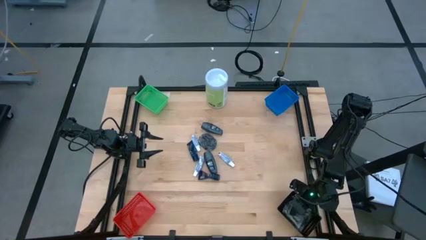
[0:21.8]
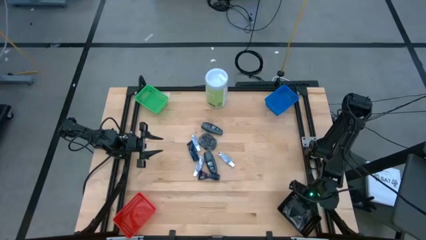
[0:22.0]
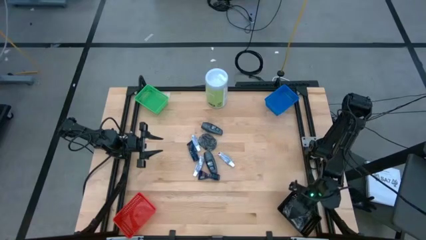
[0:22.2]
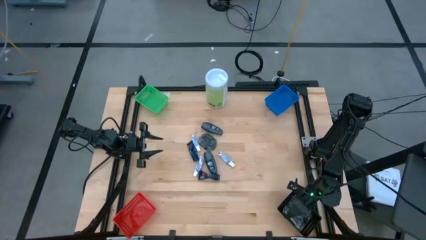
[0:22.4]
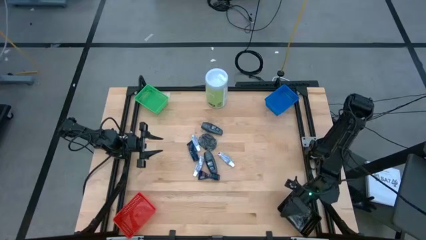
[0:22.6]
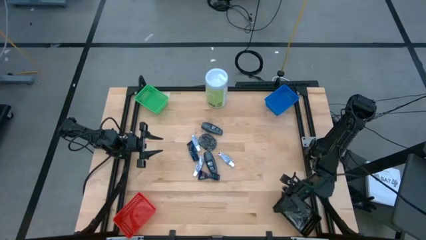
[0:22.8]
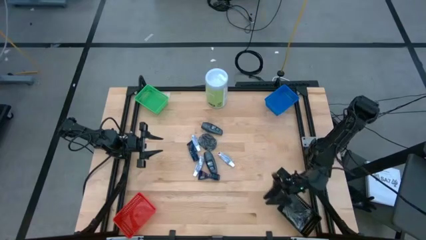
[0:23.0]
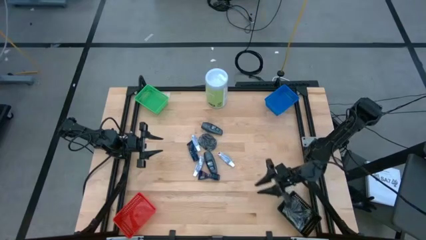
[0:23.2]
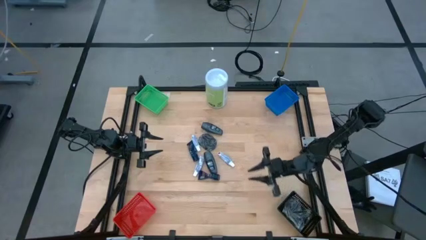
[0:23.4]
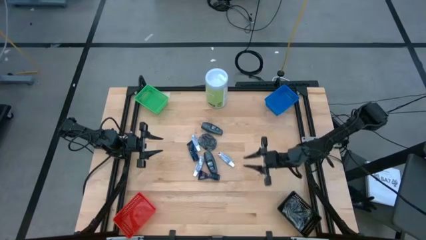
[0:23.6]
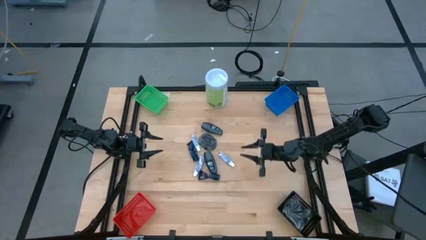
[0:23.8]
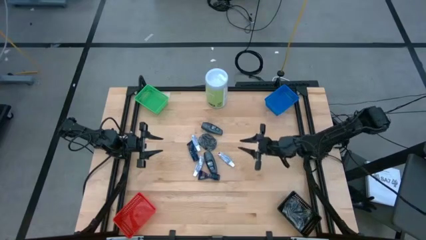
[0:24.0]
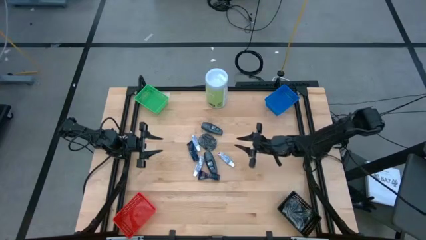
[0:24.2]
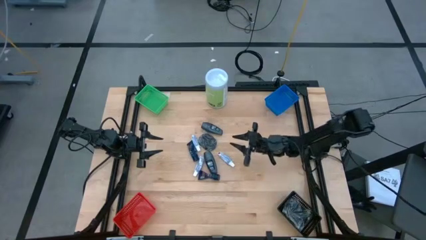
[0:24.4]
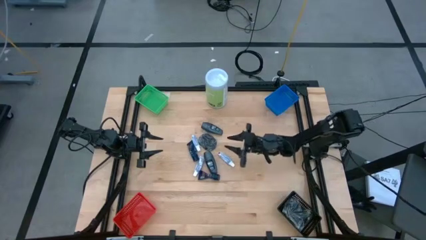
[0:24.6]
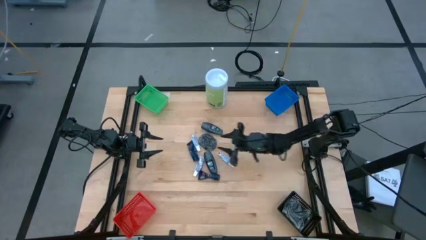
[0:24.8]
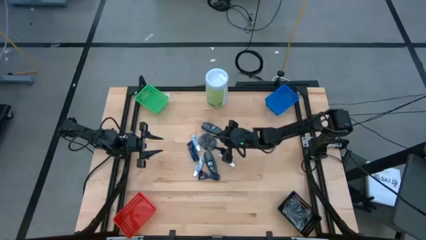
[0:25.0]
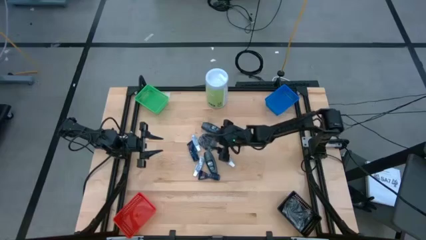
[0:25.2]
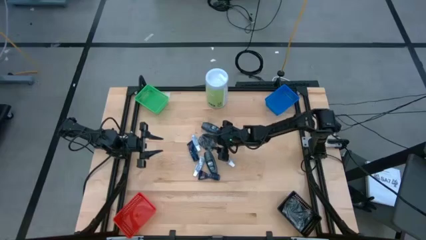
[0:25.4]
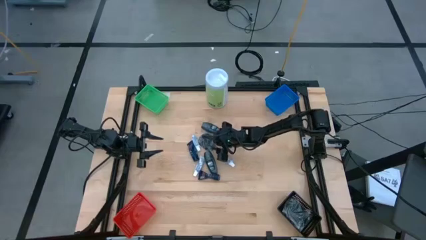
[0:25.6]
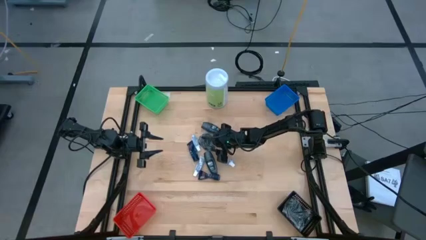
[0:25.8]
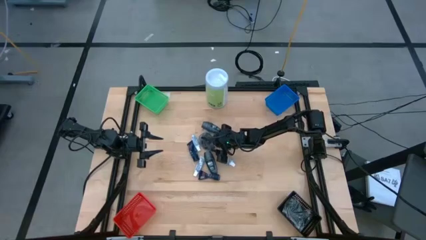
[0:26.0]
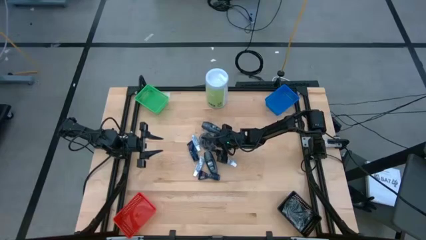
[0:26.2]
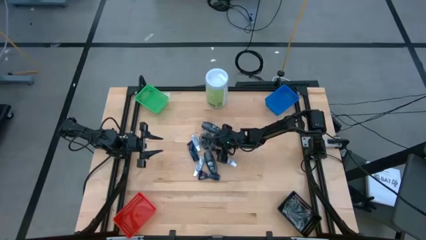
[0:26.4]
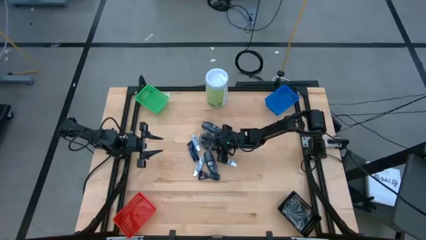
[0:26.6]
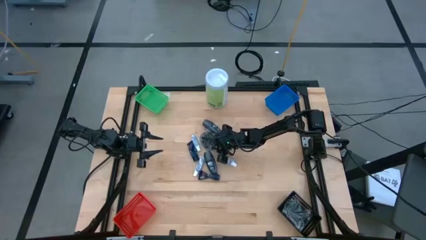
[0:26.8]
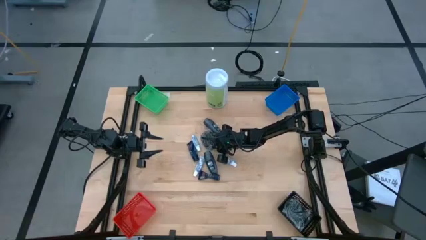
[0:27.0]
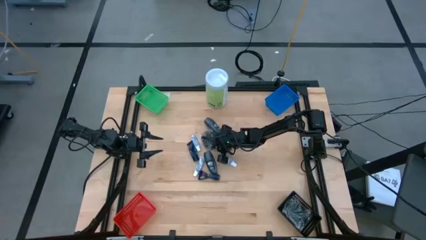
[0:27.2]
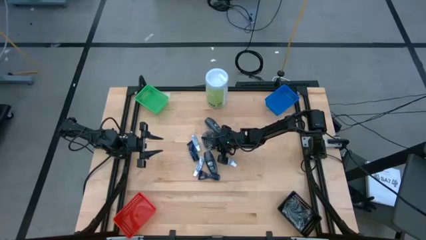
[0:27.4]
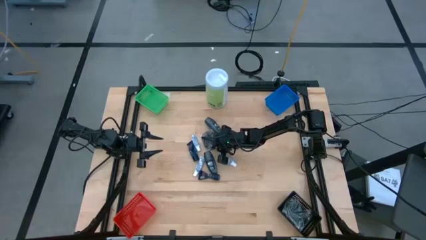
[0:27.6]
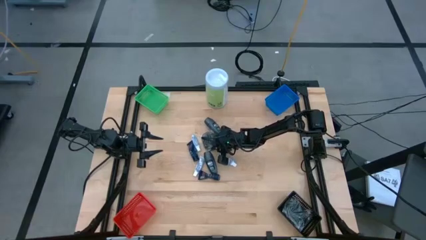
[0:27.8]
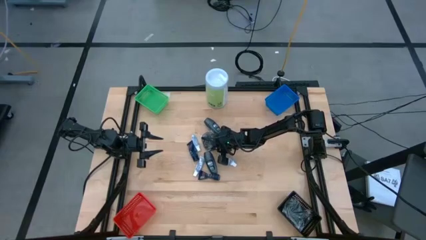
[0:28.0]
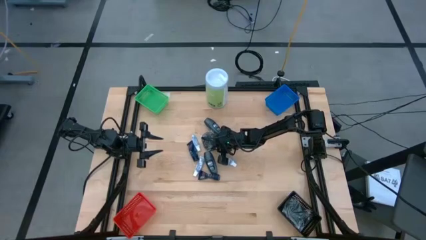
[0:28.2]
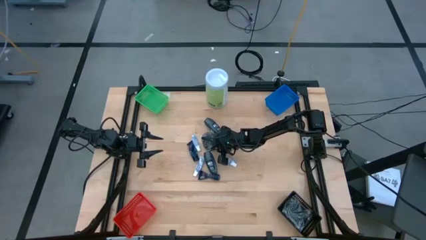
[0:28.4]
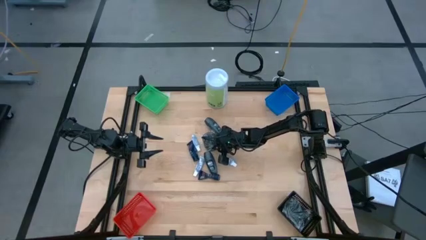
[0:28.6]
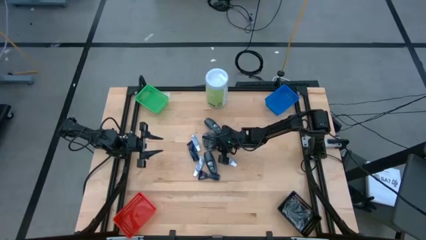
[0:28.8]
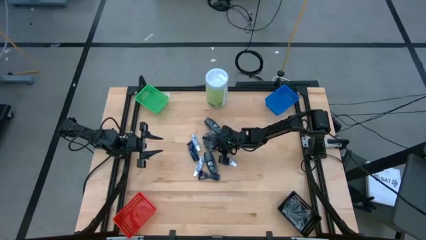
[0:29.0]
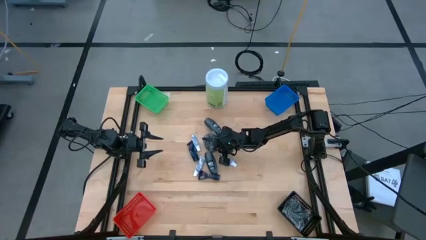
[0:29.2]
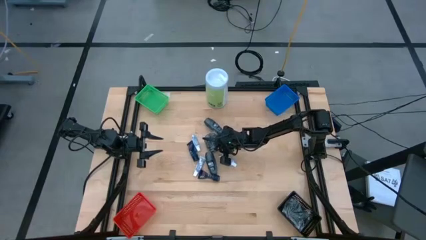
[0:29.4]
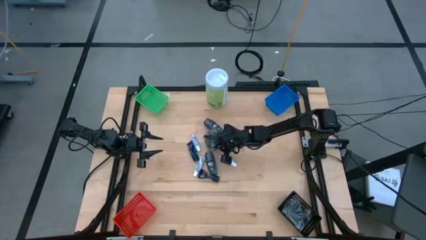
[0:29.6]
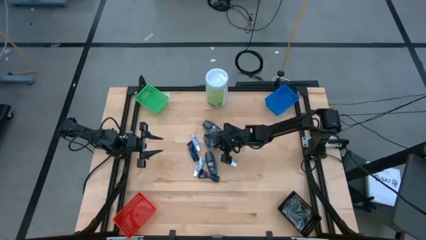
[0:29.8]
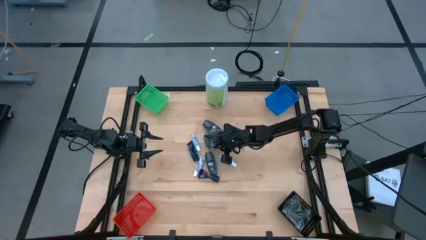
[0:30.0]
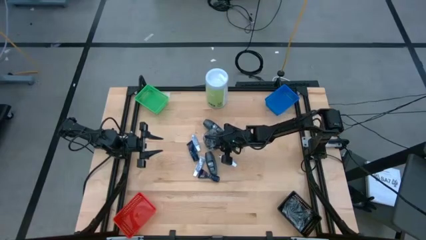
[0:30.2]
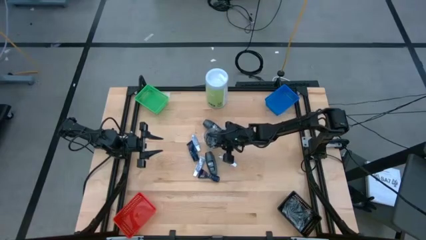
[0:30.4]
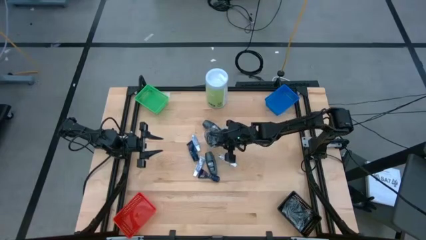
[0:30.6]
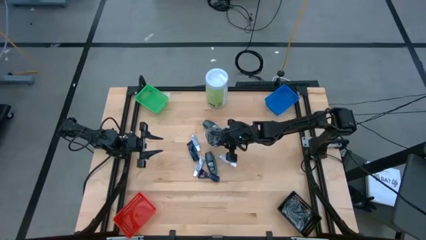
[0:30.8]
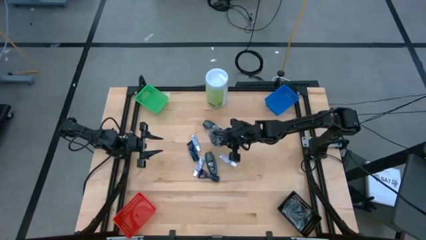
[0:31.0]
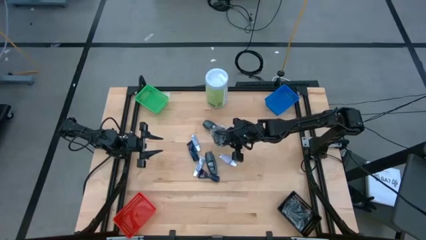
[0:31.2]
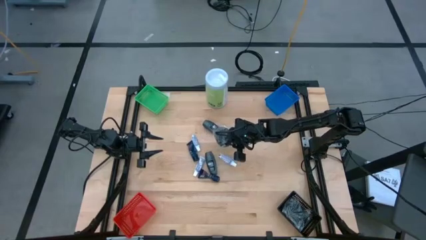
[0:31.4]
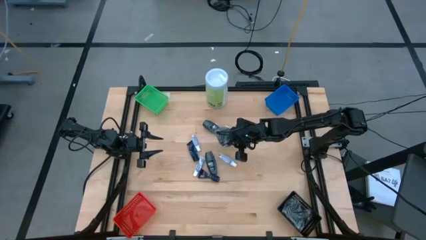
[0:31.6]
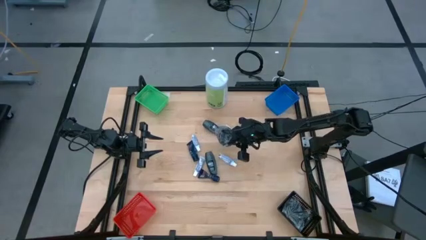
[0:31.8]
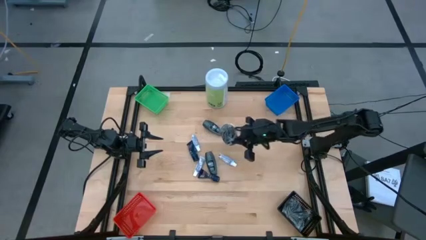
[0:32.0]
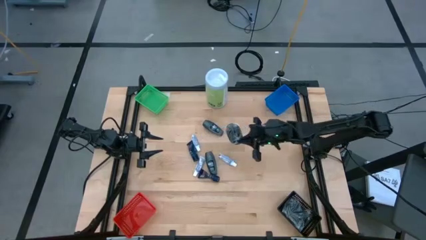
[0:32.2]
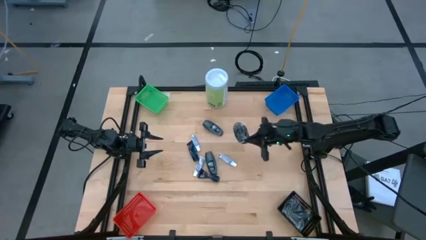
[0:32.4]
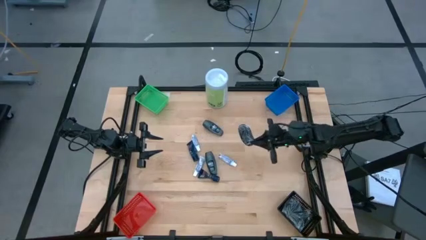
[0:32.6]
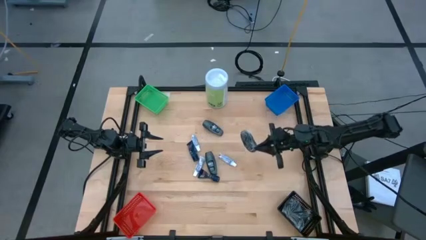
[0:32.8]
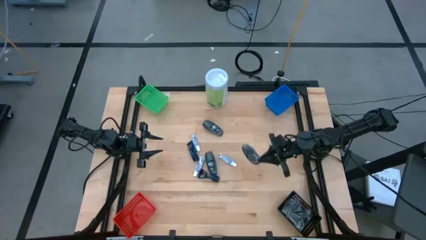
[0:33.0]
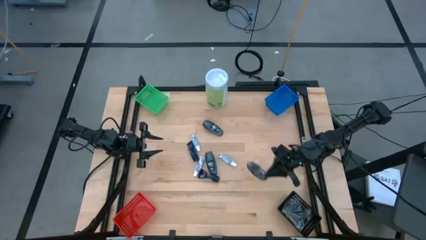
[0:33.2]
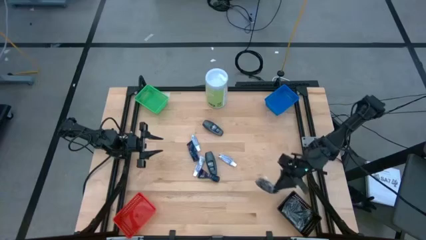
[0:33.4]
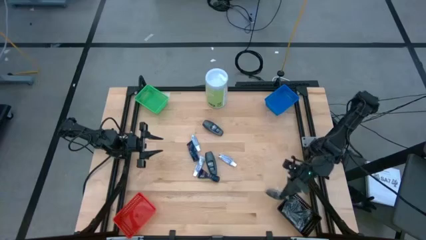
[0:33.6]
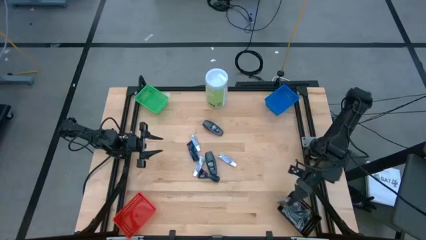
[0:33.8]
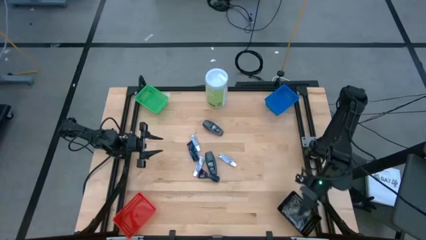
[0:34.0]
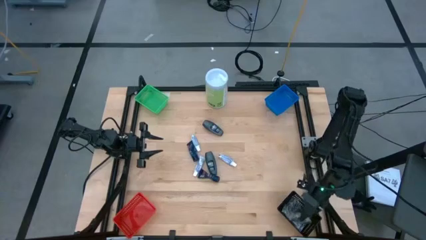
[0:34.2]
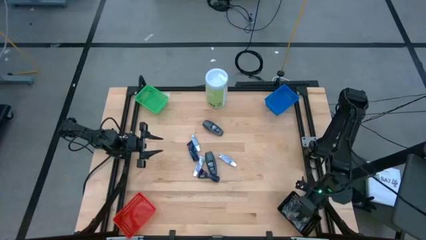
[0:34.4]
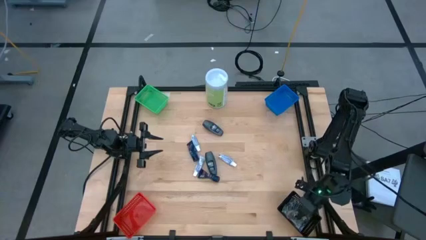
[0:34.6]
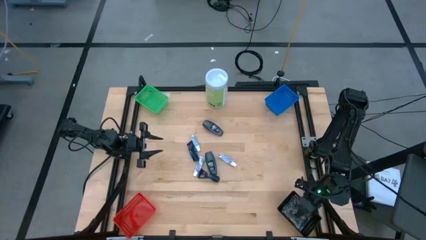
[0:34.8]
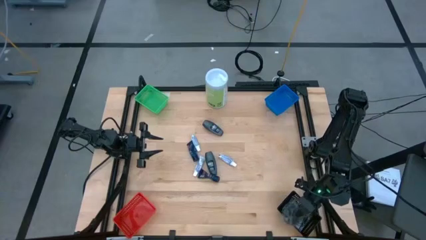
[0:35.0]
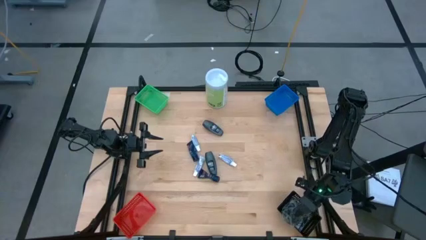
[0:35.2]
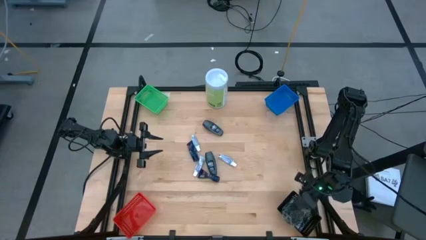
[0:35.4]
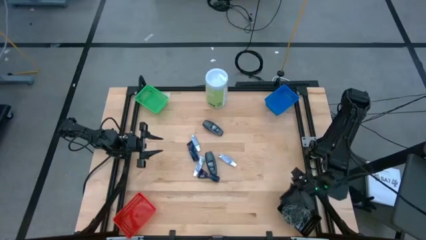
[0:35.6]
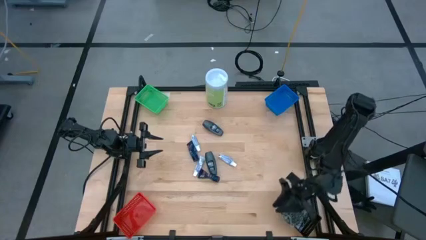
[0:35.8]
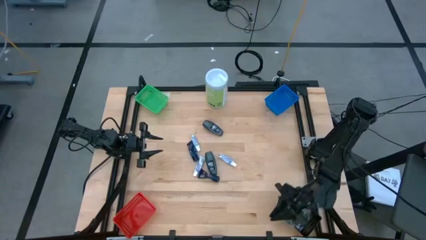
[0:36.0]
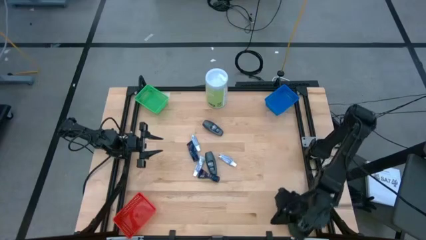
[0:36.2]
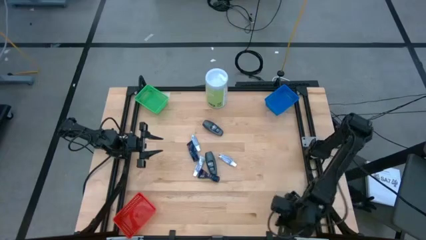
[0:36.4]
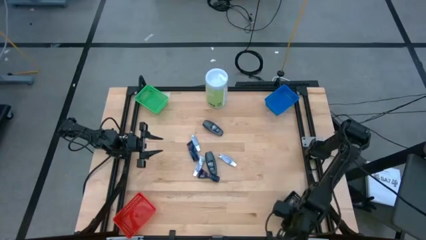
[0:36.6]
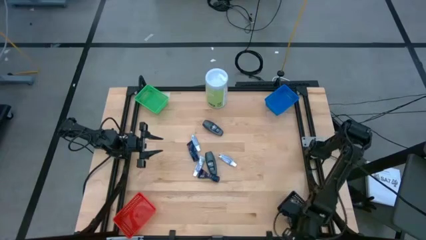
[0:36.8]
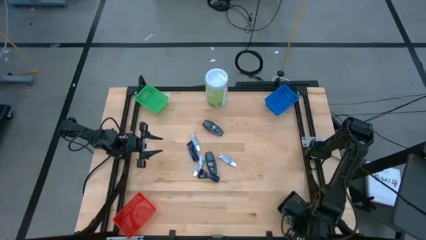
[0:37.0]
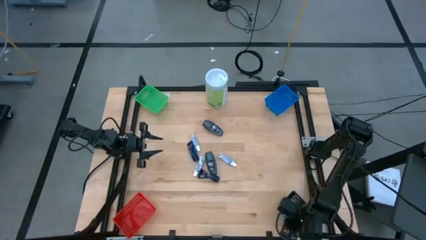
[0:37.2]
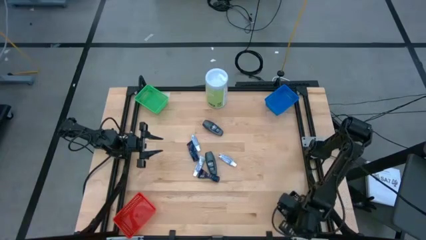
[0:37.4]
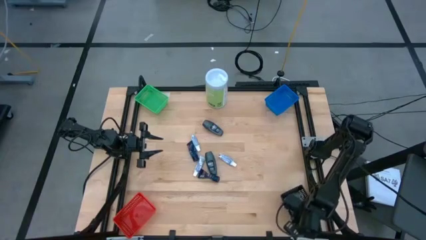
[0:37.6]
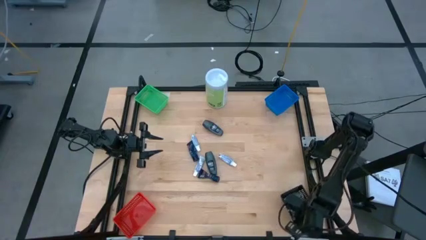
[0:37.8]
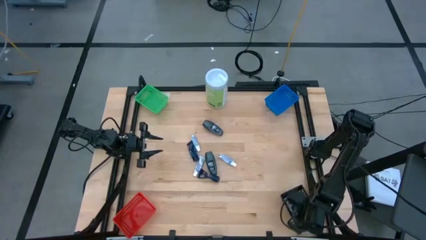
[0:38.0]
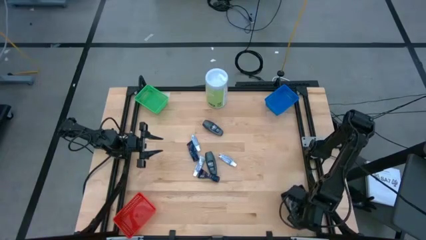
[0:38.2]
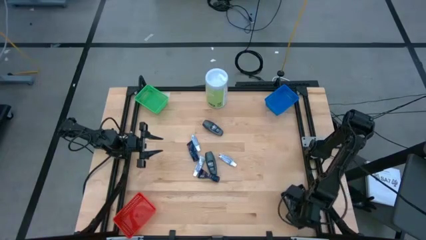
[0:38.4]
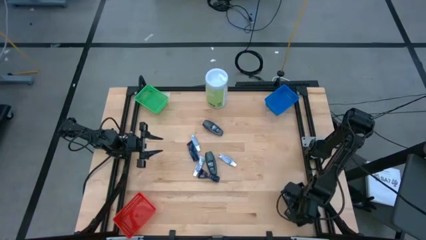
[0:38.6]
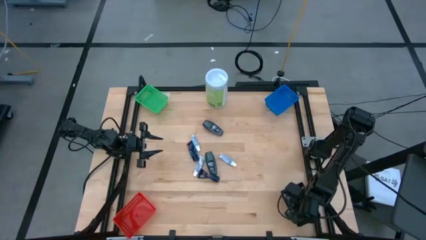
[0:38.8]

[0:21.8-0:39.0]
Task: Pick & Place Travel size toiletries
Put the black hairbrush into the black bin
